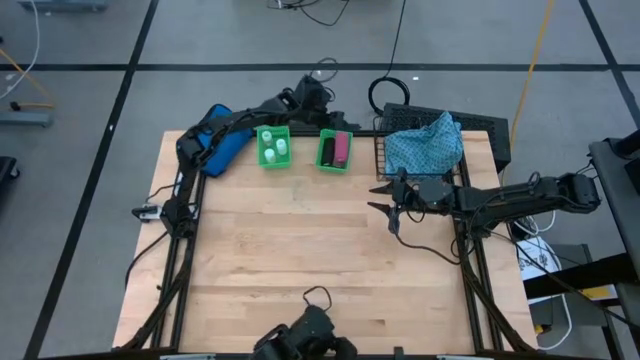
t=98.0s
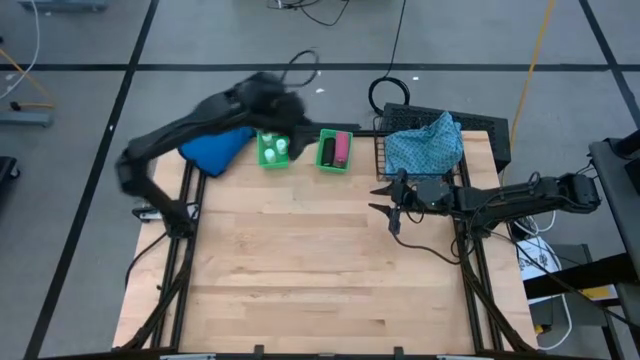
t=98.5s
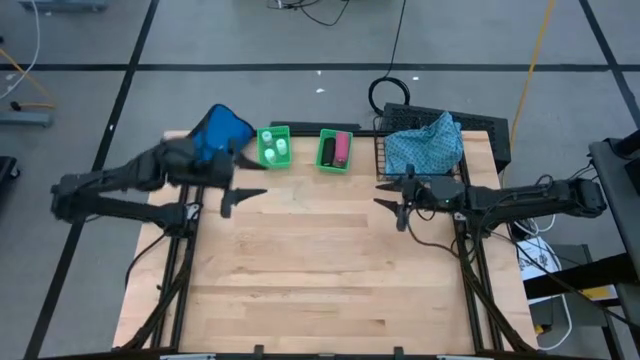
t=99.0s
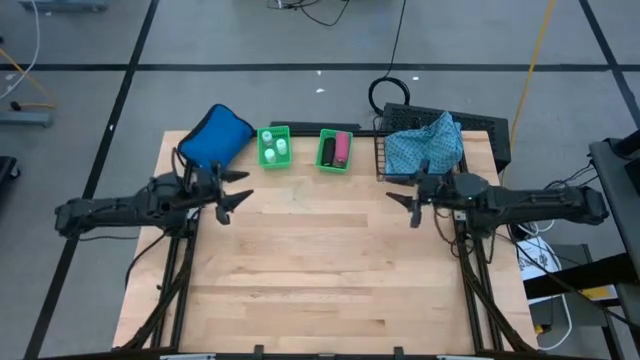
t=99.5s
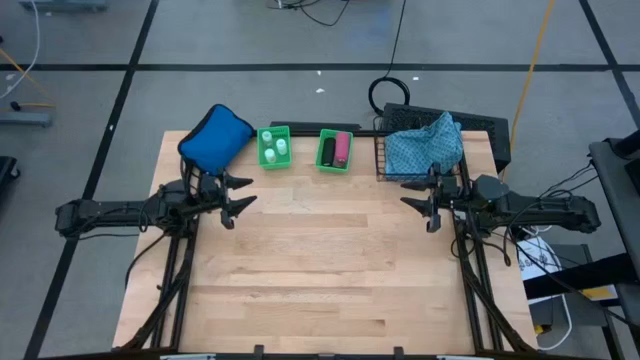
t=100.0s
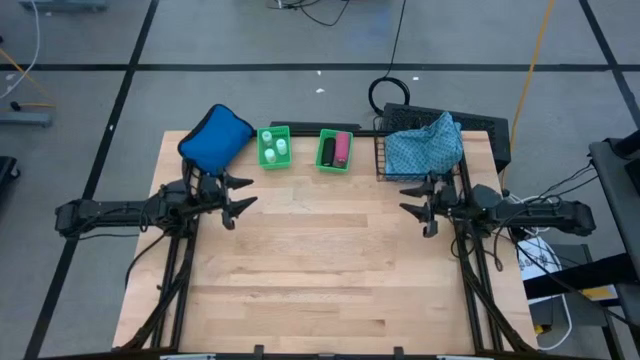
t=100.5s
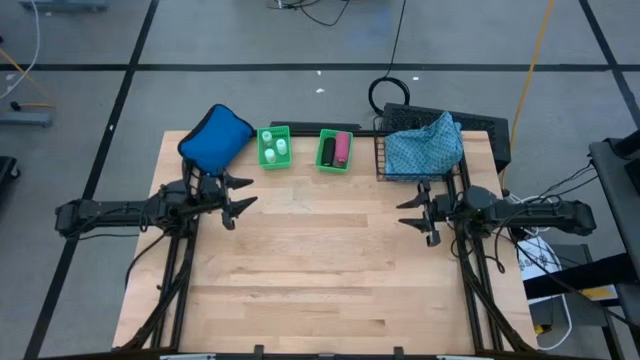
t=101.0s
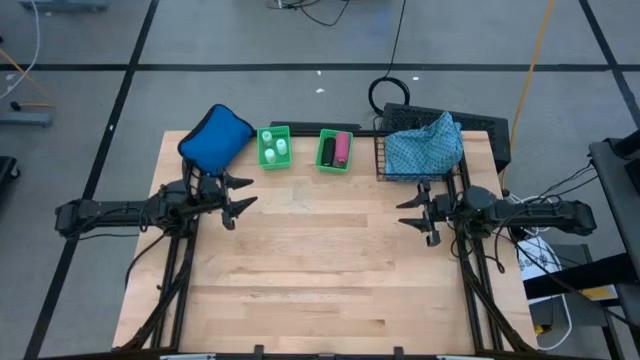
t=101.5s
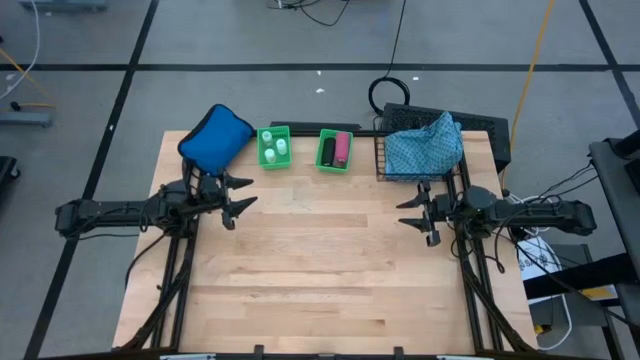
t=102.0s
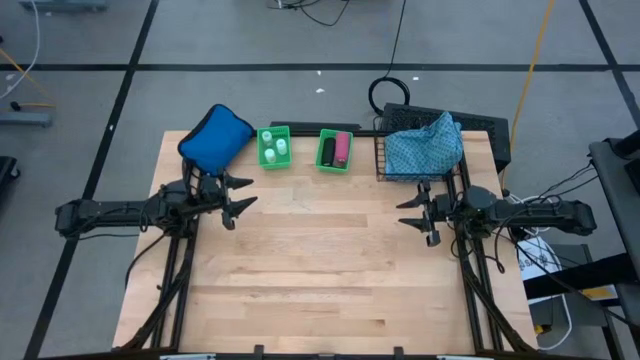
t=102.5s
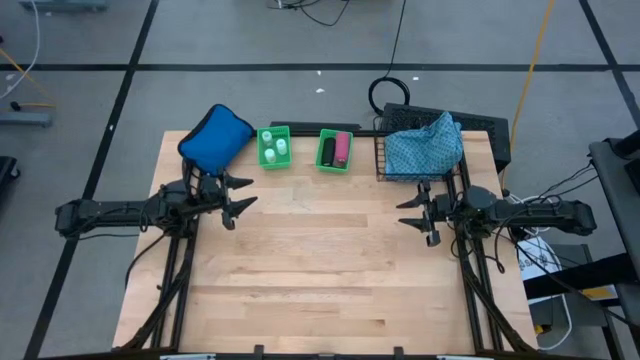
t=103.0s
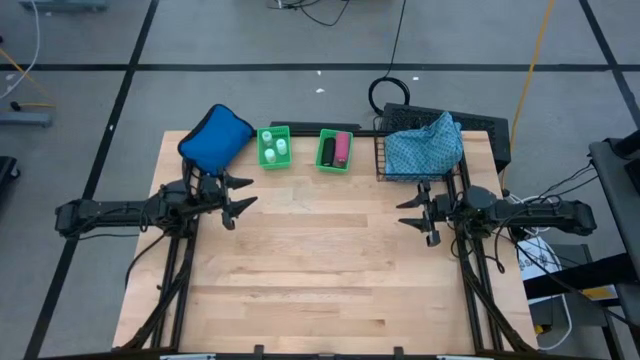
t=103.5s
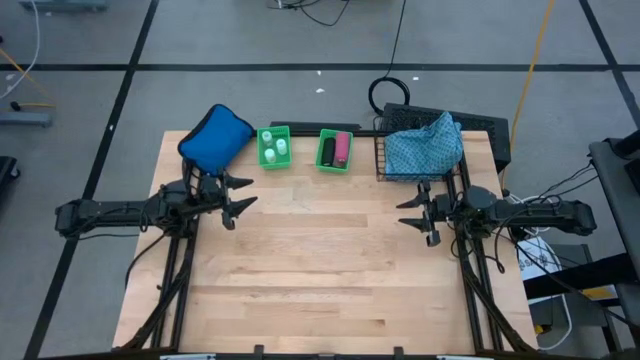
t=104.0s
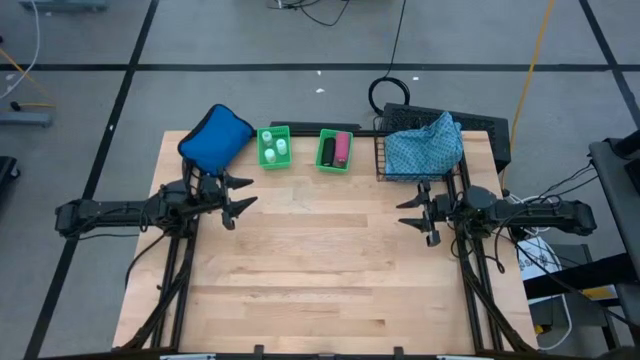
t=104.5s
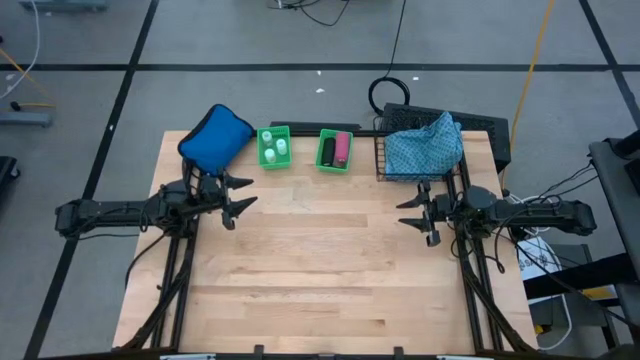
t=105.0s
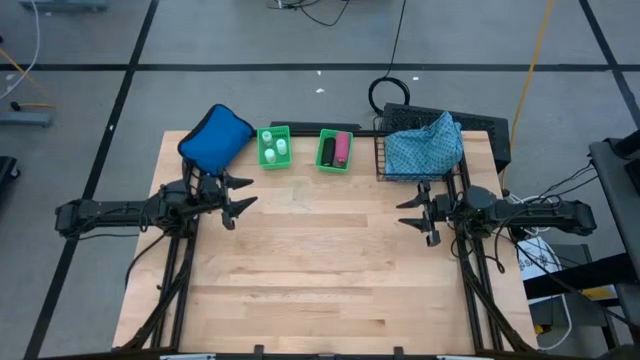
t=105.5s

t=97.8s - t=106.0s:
Task: Pick & place medical supplies in basket/bin
Return to Home Position

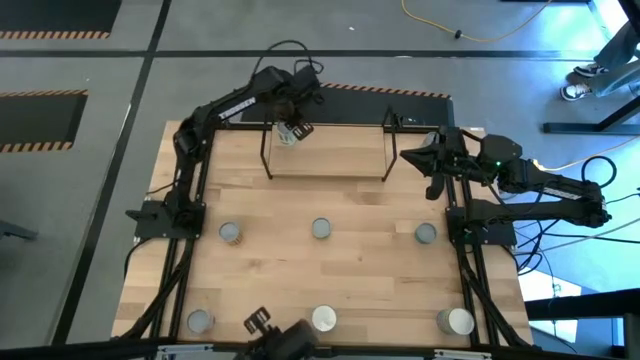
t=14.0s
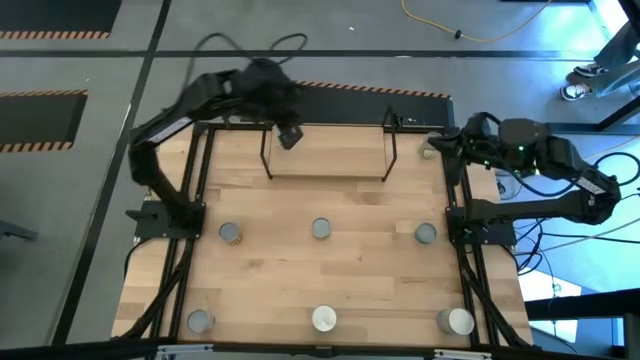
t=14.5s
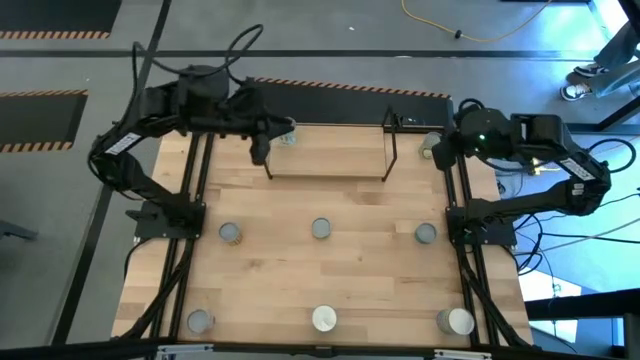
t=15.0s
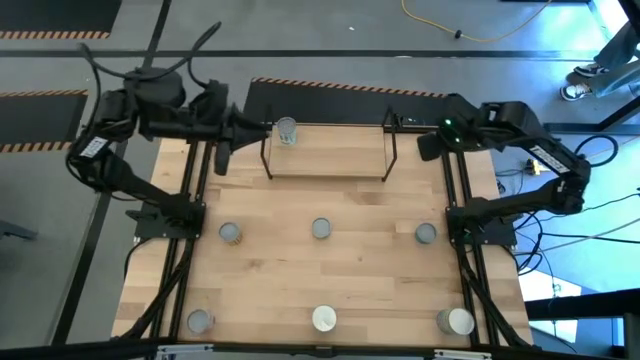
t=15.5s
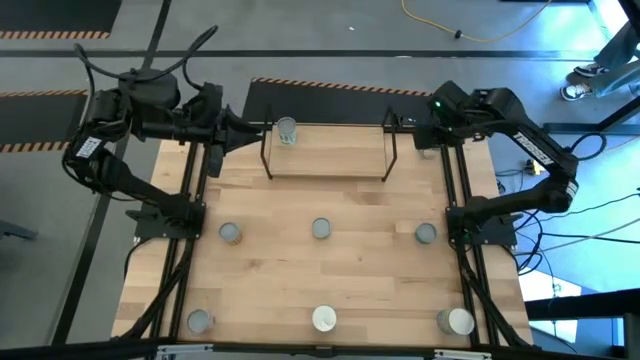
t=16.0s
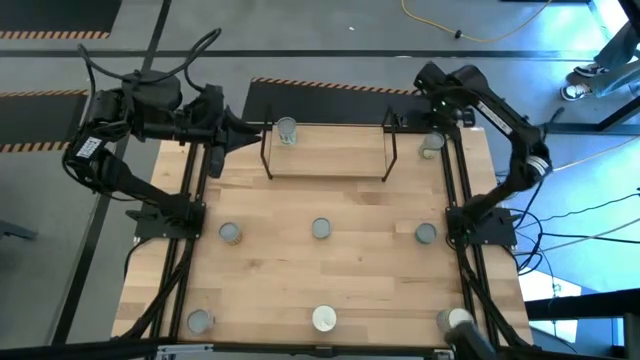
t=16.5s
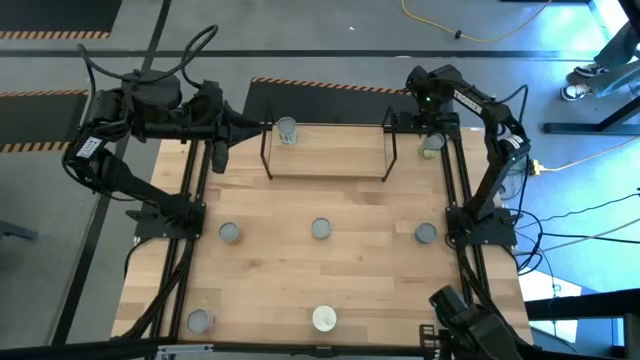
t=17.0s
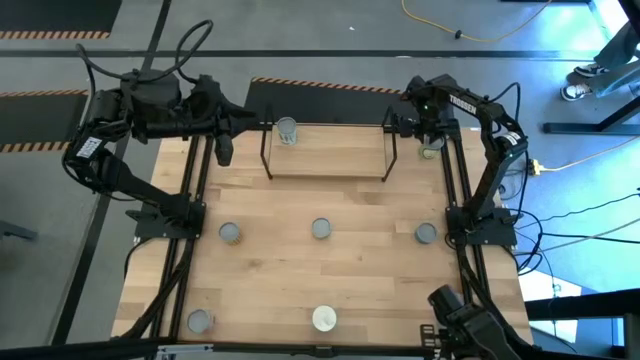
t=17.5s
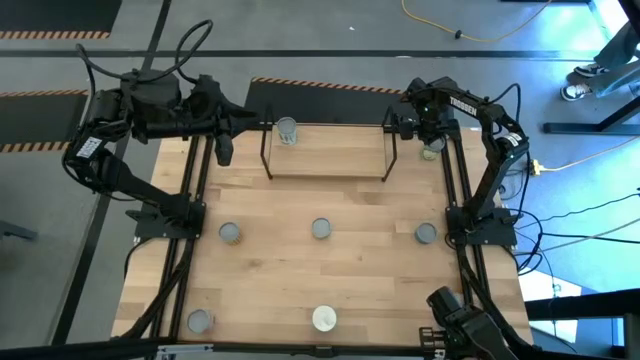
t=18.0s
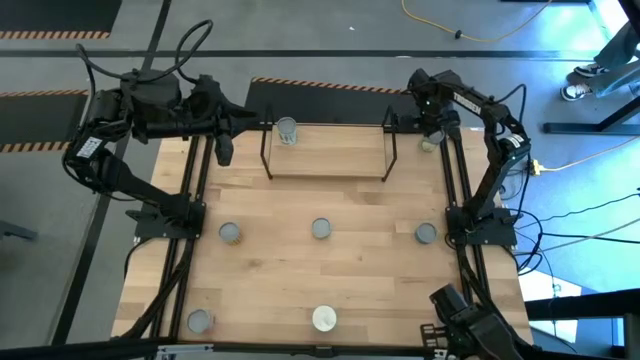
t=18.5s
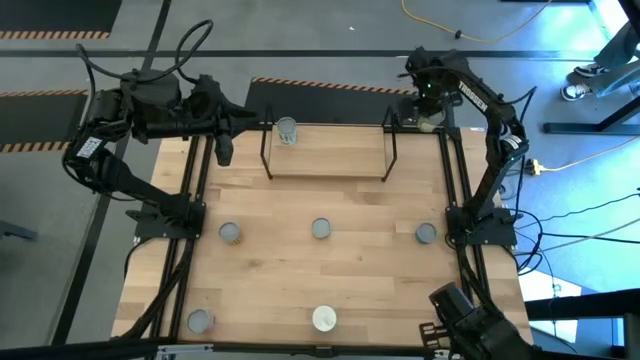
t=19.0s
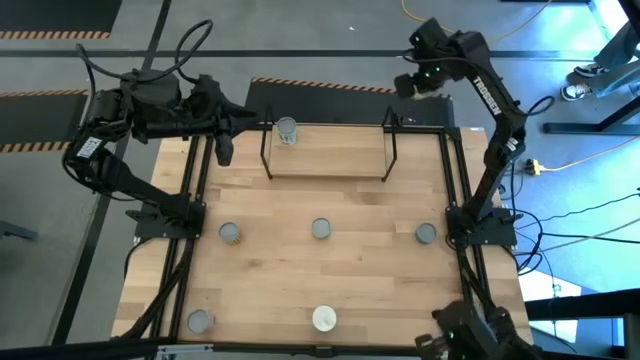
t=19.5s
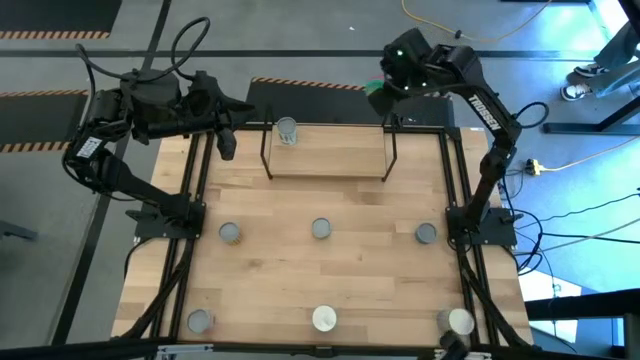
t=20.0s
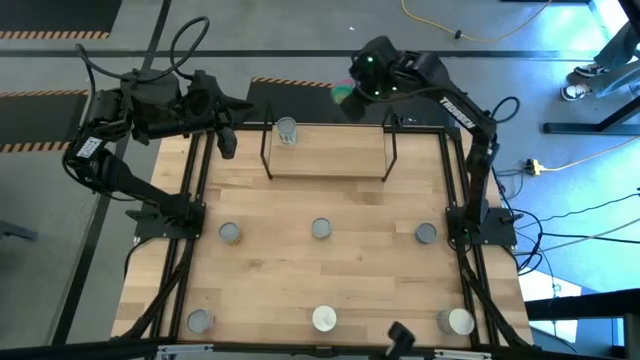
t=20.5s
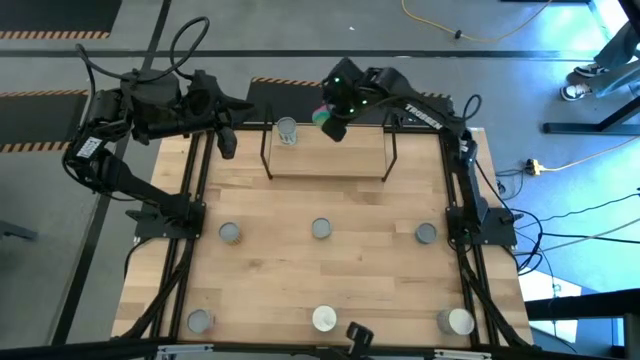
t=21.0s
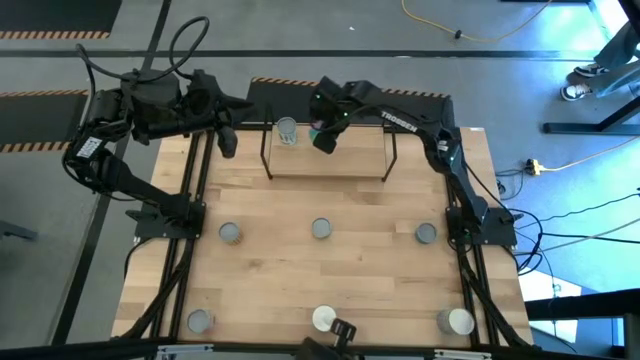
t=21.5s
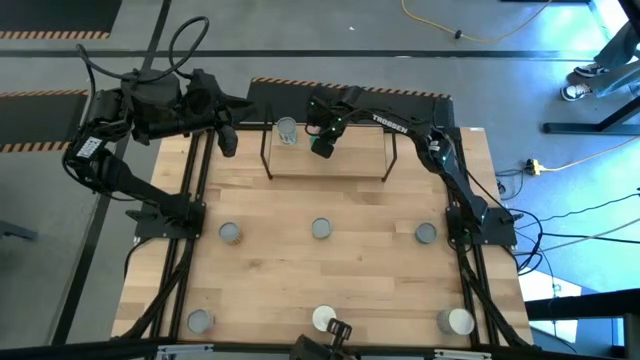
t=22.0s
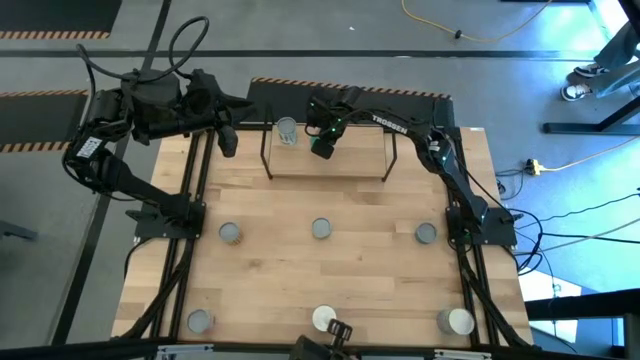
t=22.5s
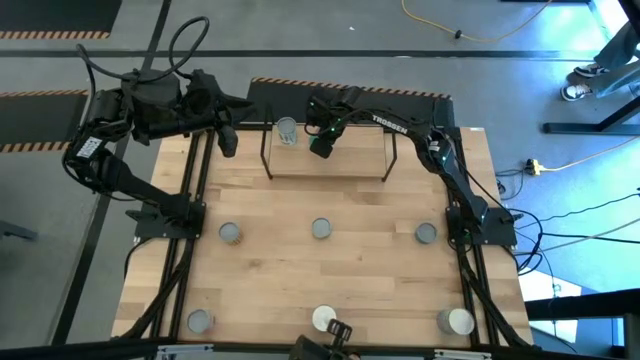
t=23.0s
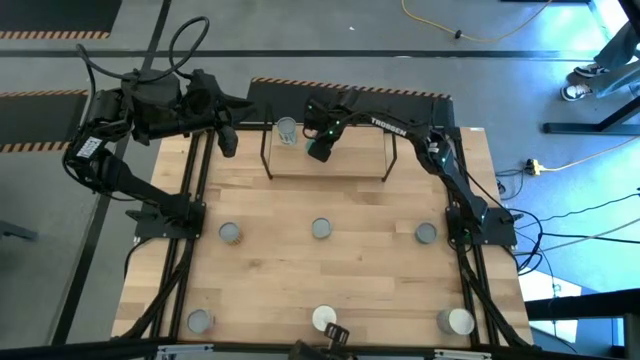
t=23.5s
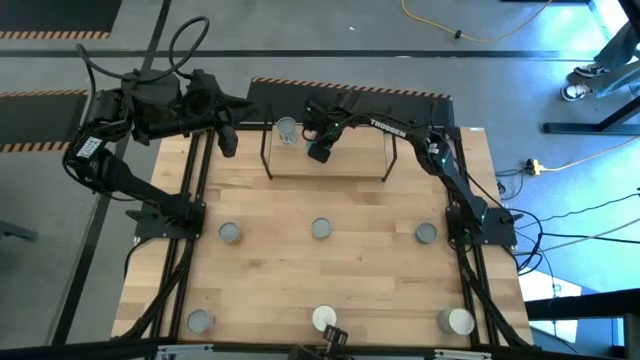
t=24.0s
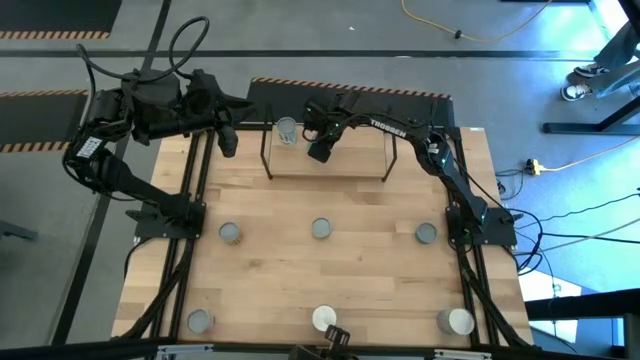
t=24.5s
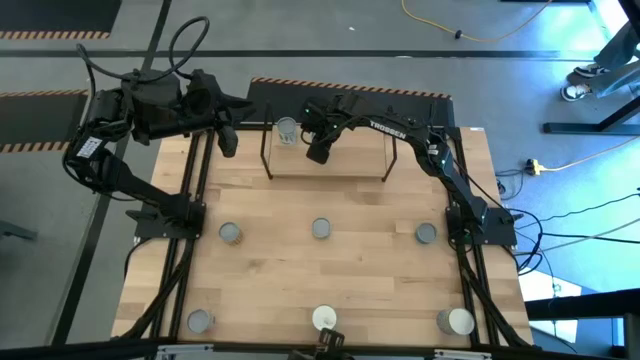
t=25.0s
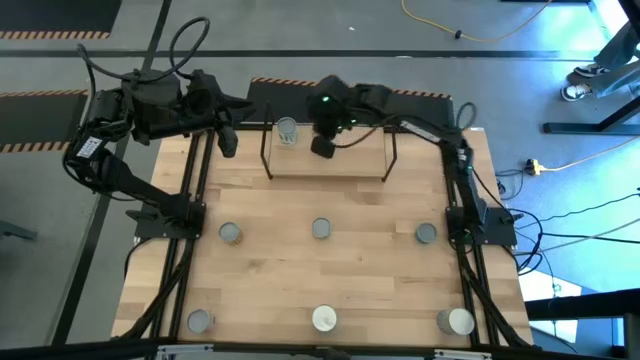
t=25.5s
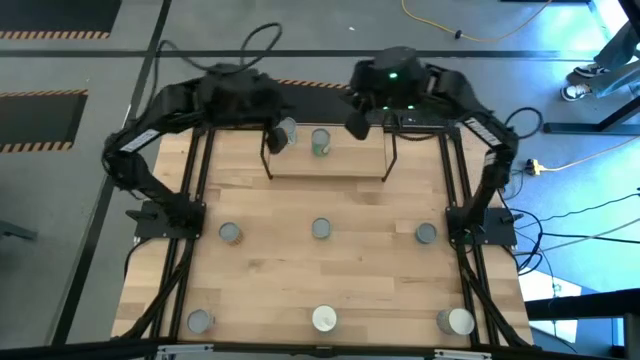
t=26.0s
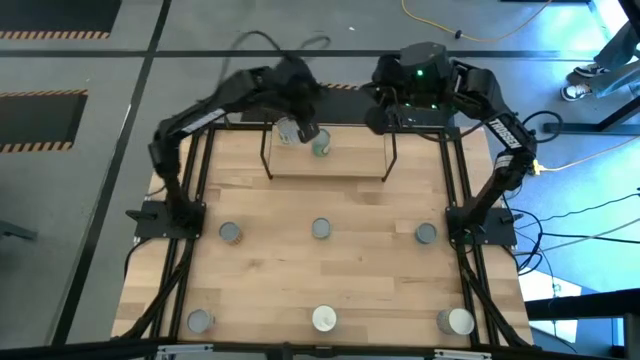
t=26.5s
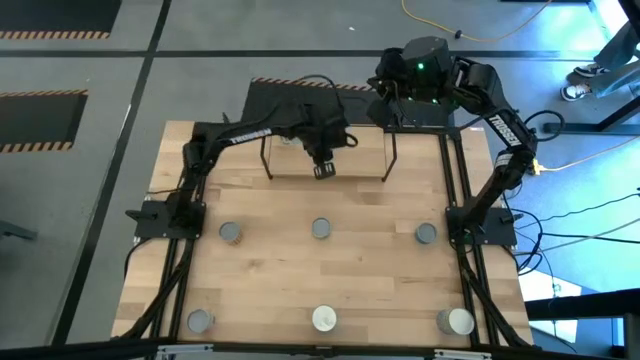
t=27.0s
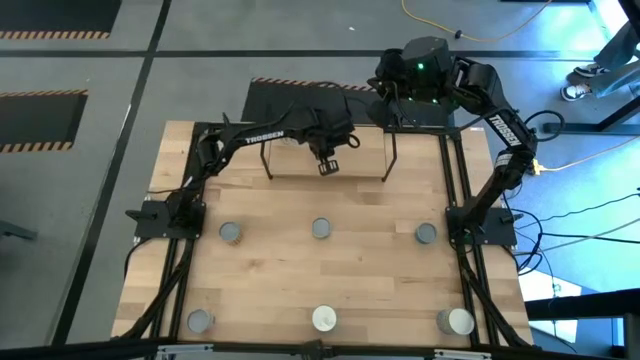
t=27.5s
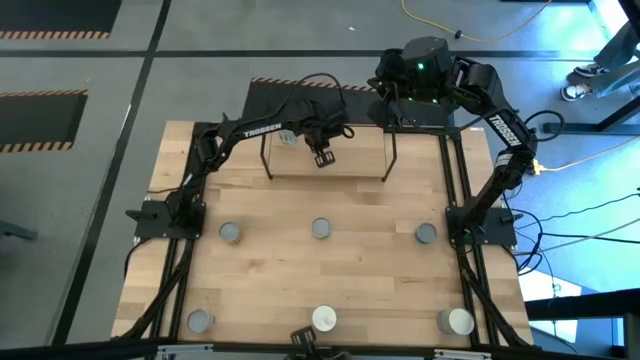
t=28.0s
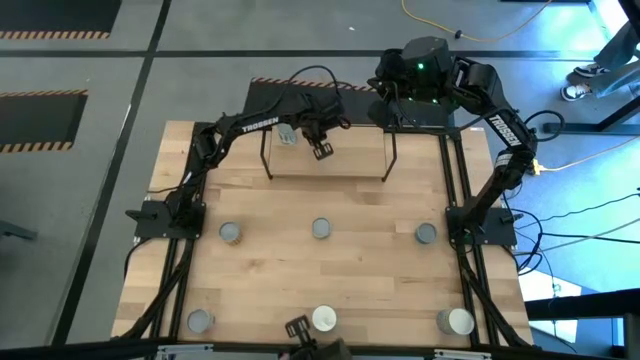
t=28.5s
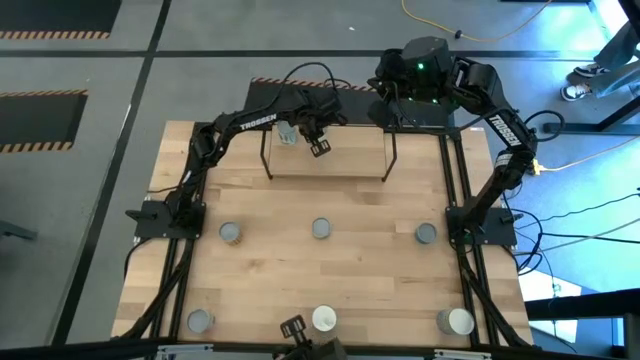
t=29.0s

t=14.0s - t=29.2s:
Task: Pick and place cans onto a shelf
Put the pink can on the shelf aligned with the white can
